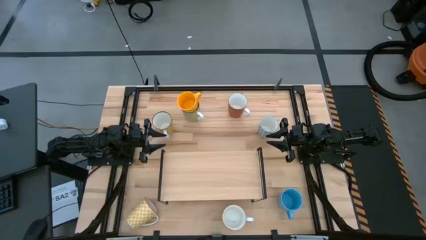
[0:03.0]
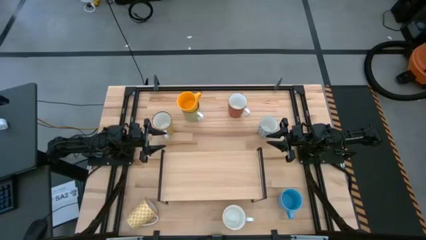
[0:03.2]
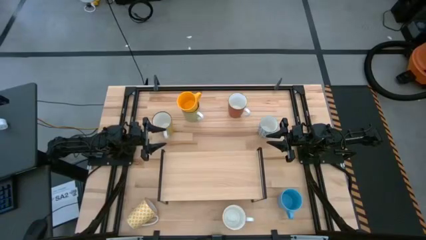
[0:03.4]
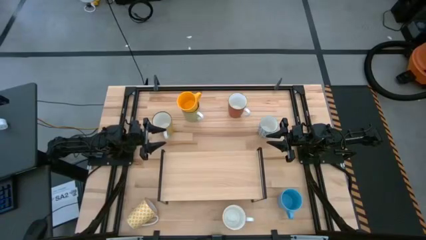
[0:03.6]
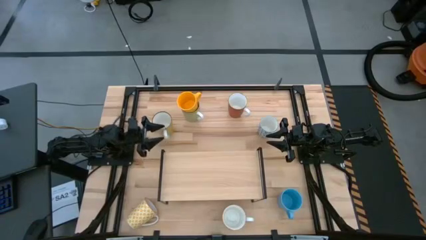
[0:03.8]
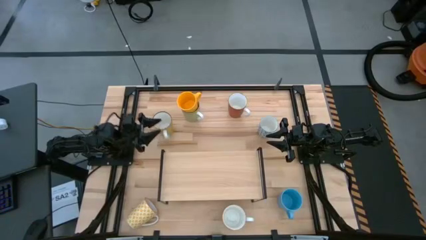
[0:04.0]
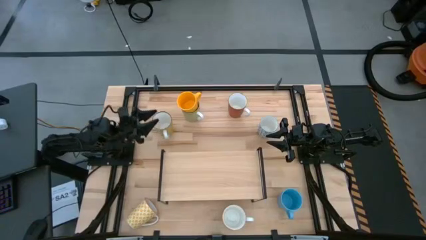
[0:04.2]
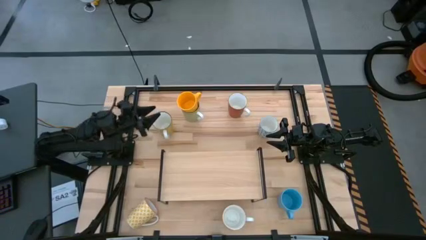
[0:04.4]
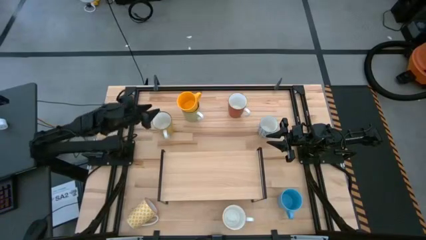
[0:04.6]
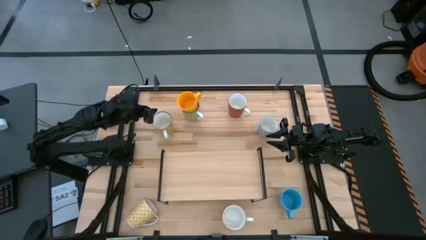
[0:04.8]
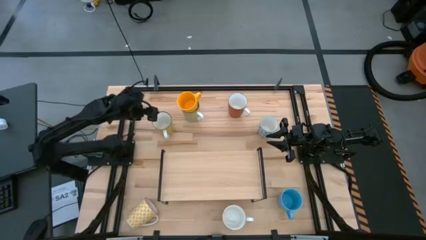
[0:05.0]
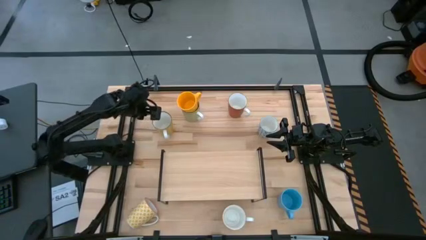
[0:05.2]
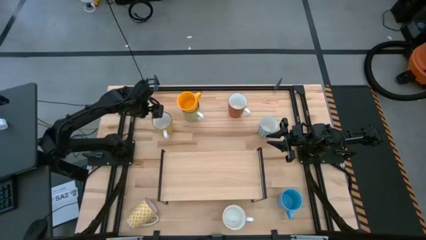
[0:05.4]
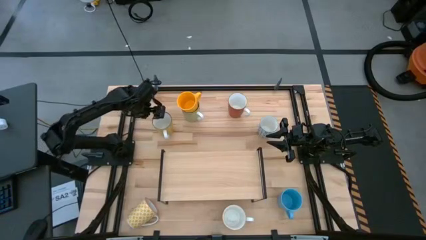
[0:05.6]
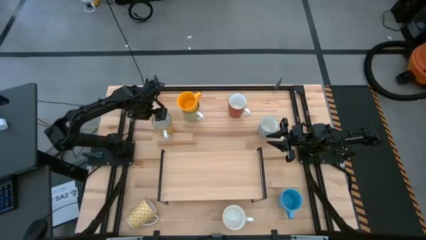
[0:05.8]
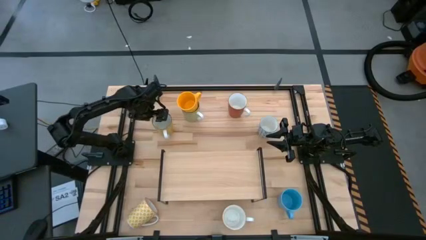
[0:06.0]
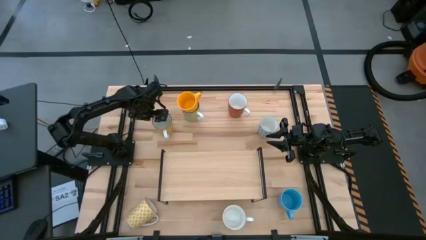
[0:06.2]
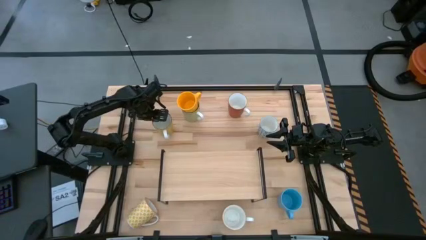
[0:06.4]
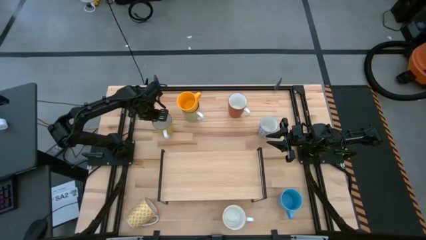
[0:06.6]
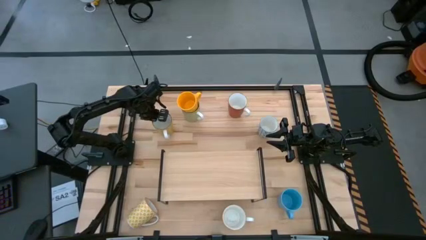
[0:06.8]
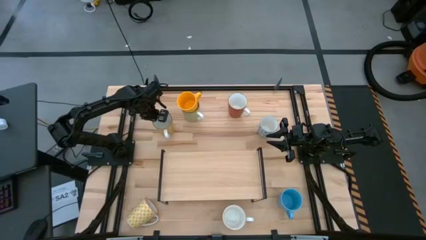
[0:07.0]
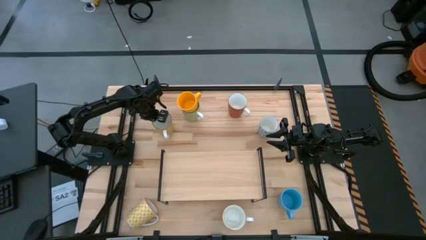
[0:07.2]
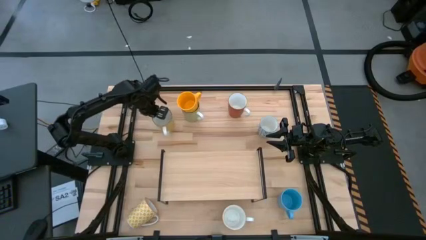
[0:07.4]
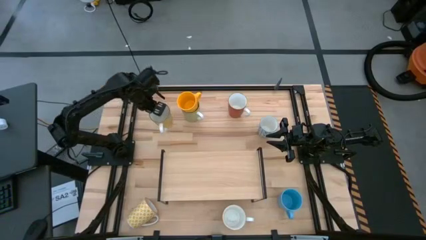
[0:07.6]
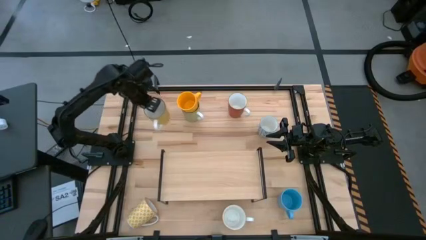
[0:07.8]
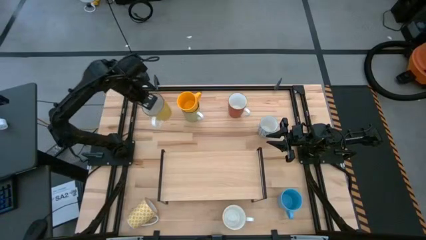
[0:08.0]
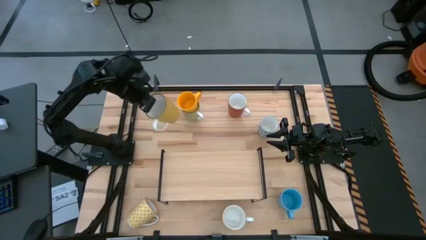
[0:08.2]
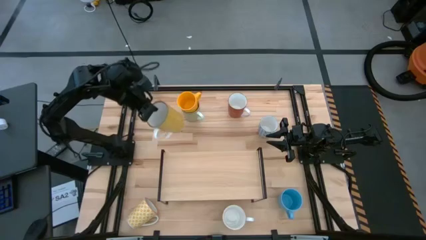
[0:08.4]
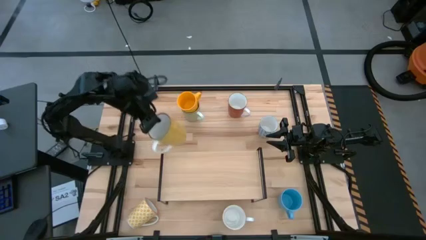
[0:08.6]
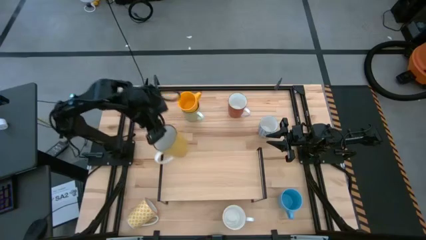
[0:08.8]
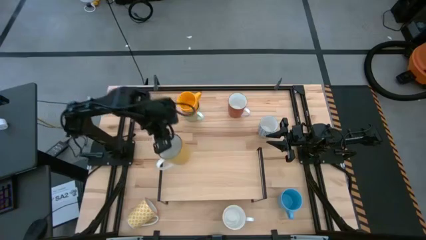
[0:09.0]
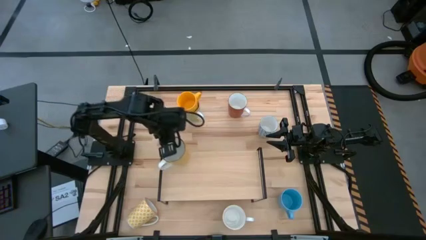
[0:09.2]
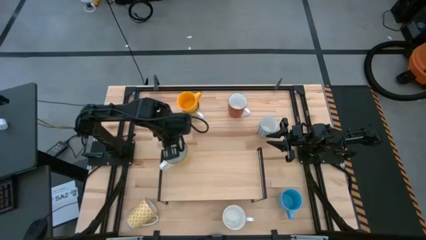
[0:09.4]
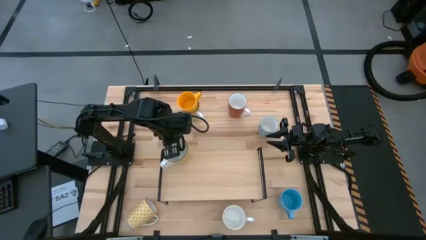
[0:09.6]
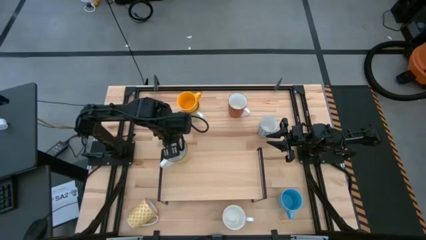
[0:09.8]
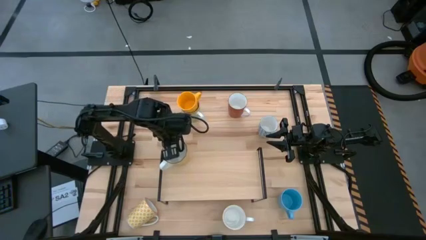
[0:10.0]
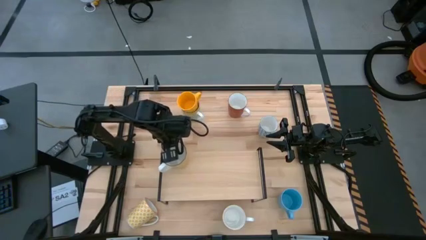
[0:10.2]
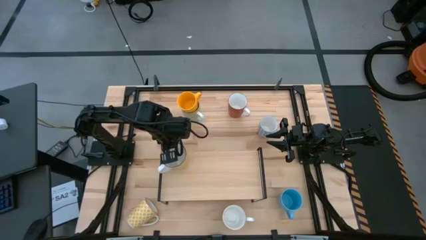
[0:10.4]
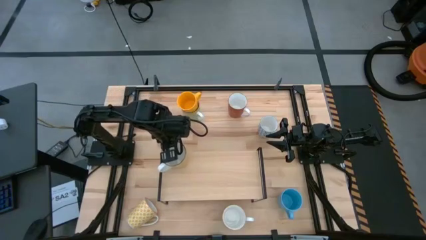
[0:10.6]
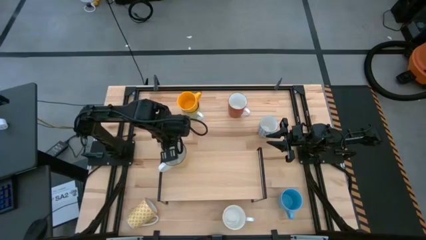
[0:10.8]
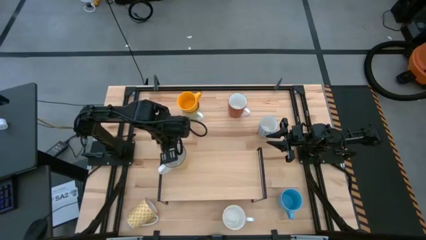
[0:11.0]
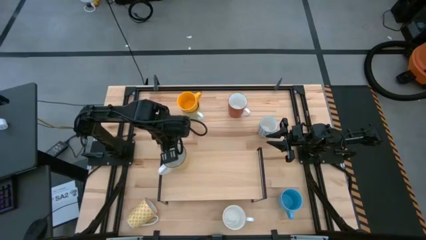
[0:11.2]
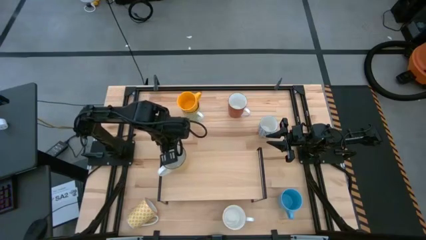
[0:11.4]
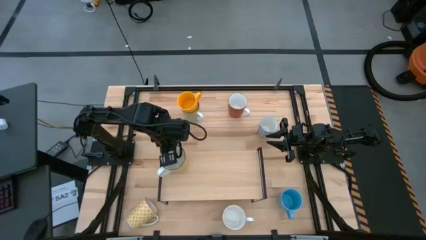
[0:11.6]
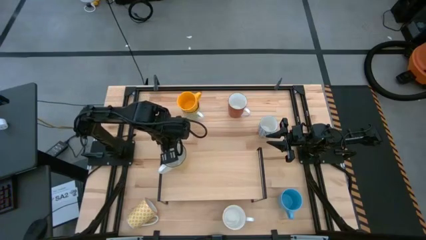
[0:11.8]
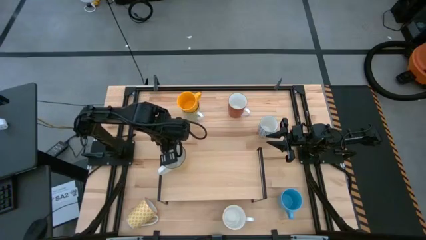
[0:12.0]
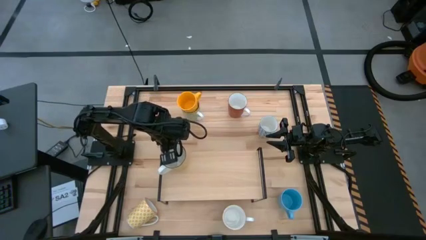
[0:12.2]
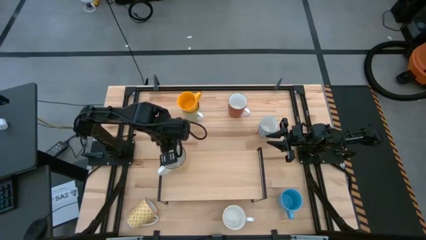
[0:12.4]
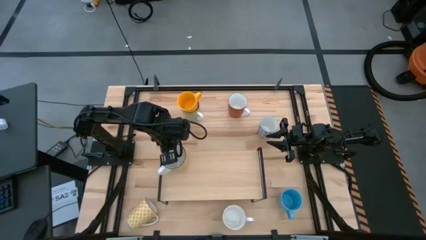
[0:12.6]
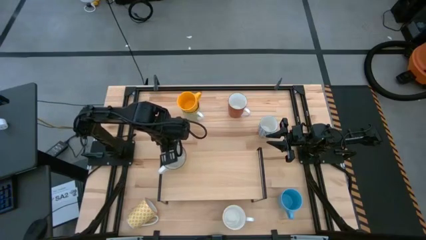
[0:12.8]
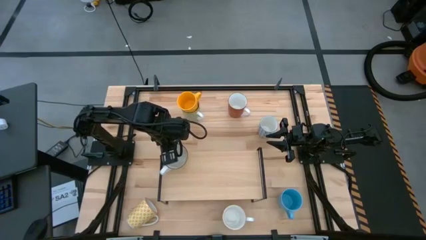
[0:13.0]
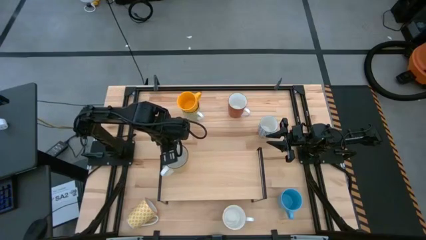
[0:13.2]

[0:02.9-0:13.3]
Task: Place coffee mugs
Put the light yellow mug on the shelf
